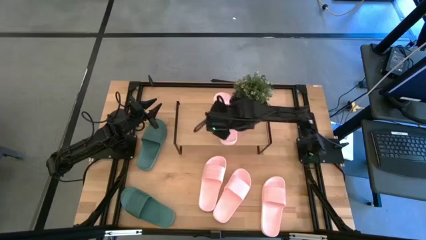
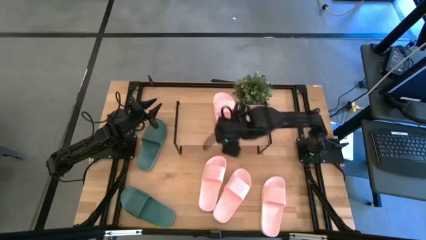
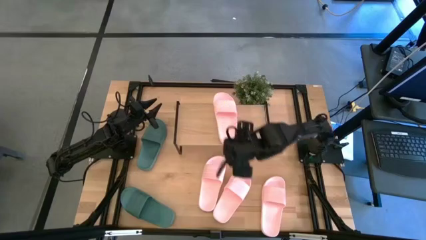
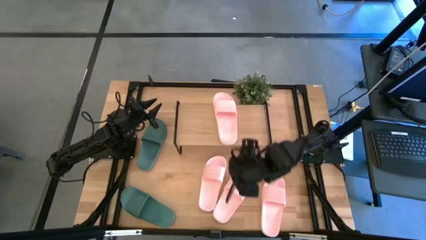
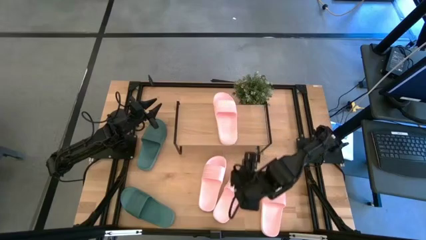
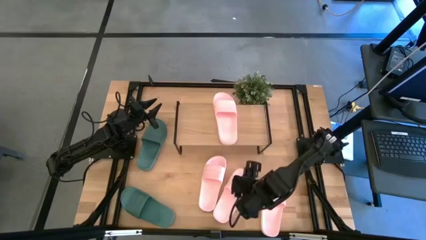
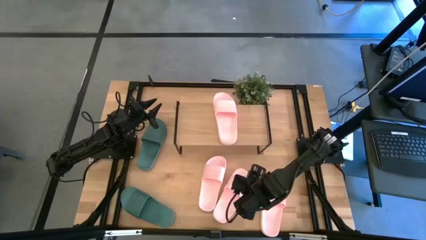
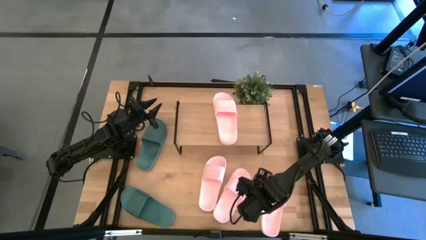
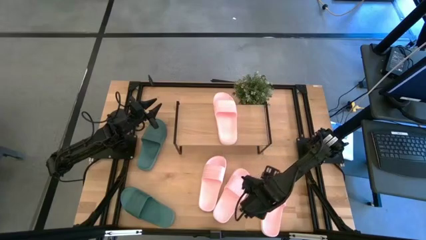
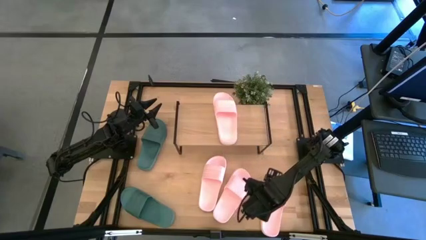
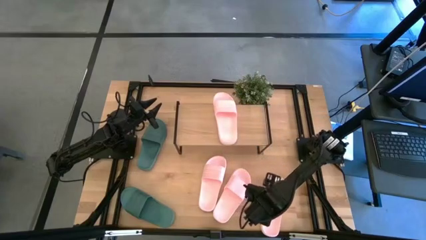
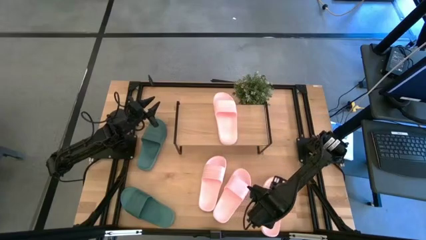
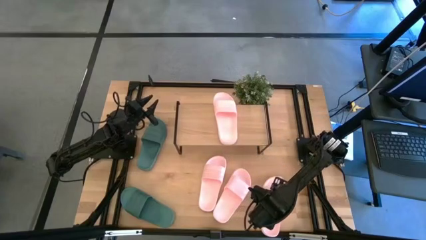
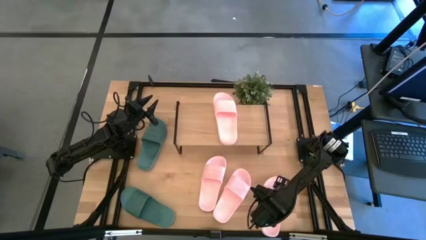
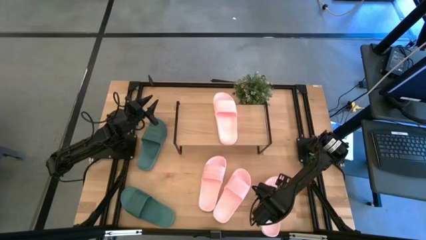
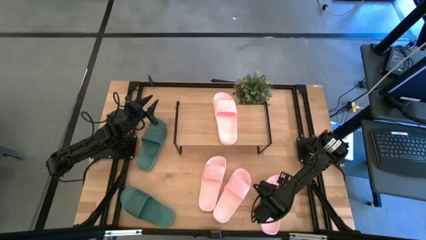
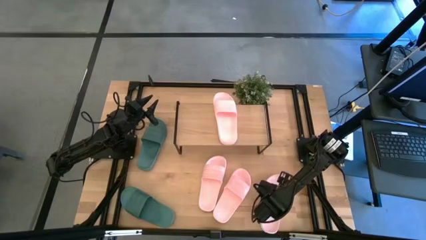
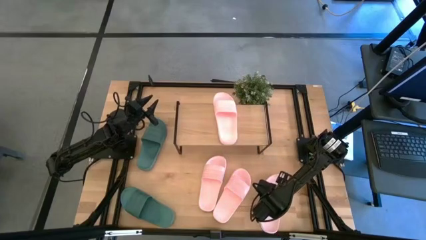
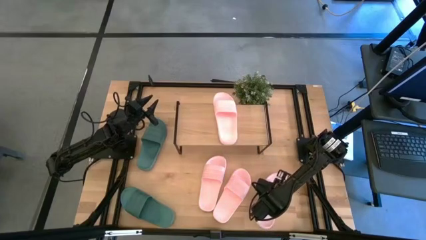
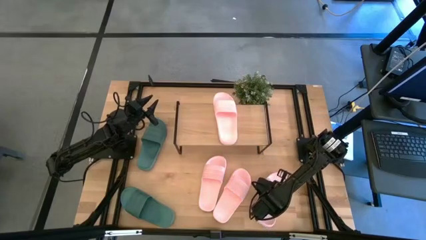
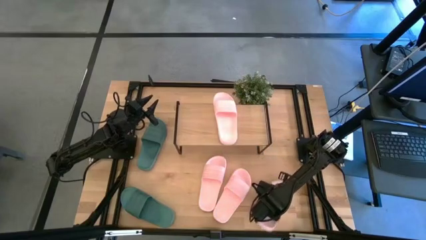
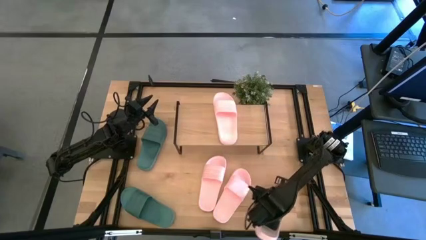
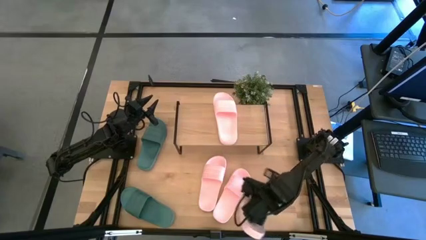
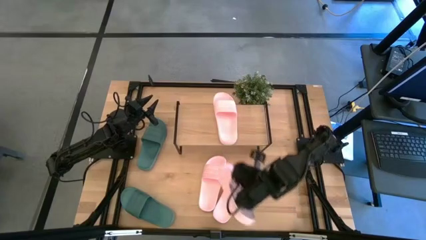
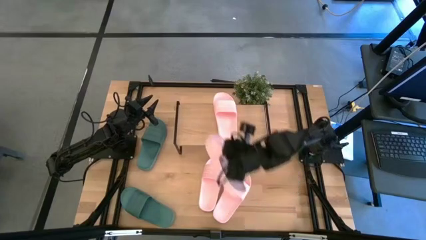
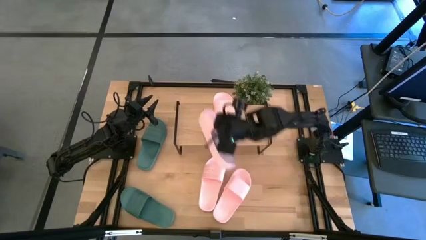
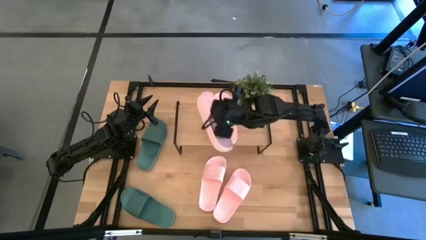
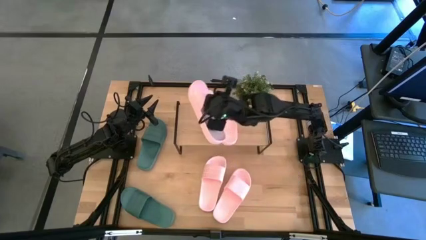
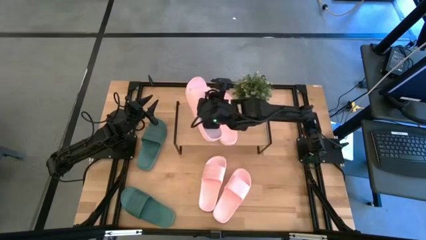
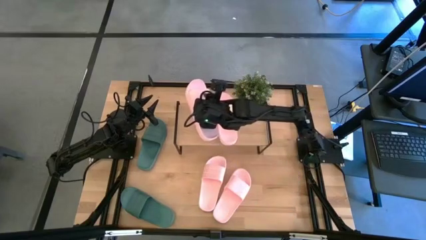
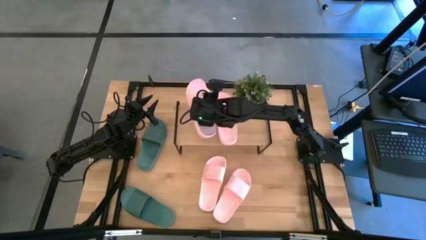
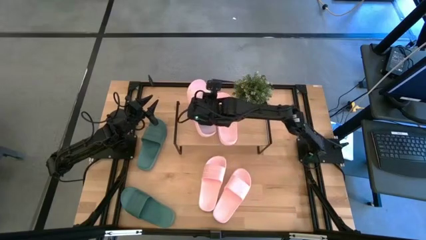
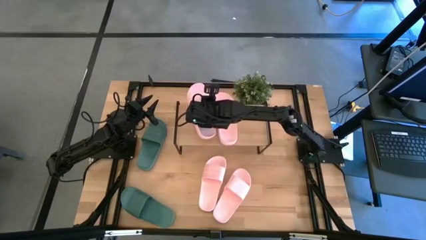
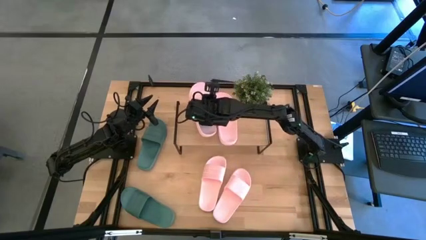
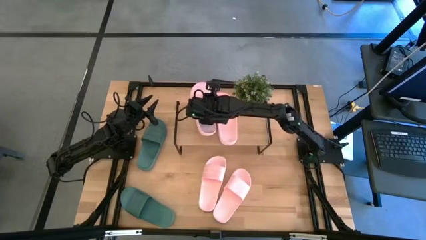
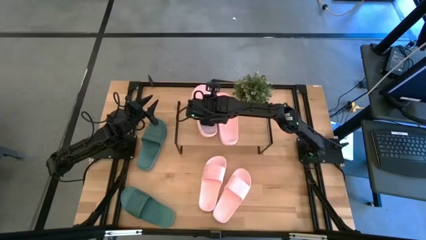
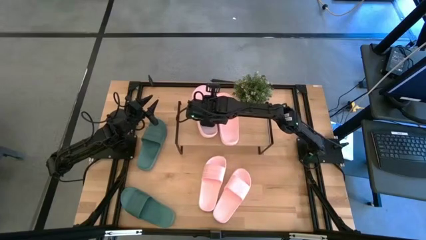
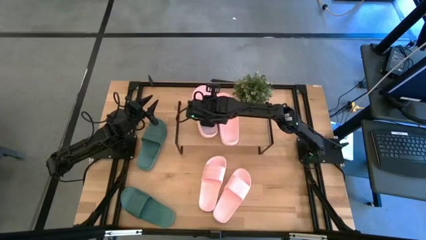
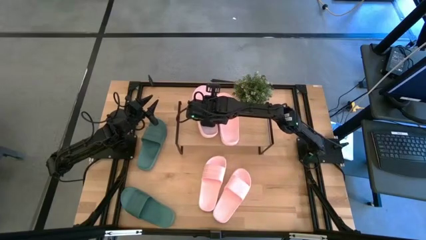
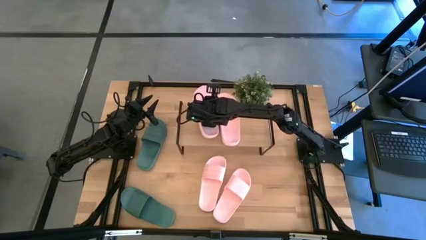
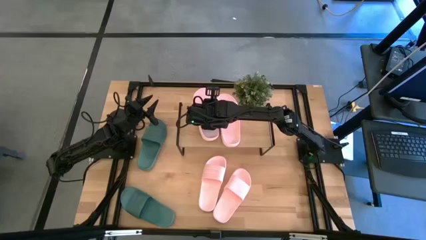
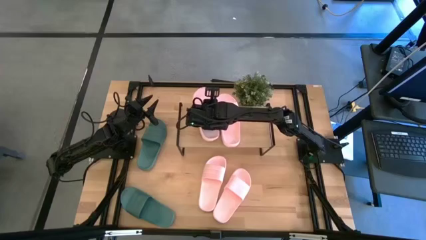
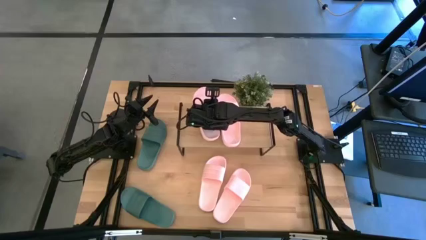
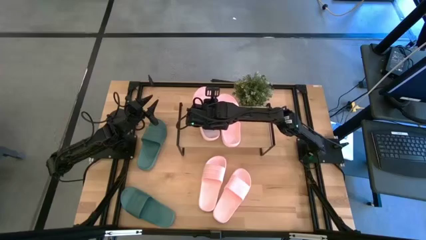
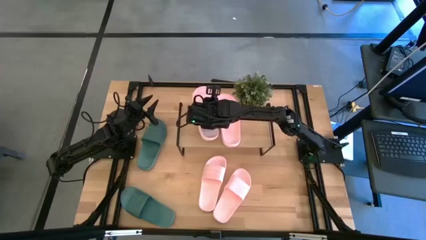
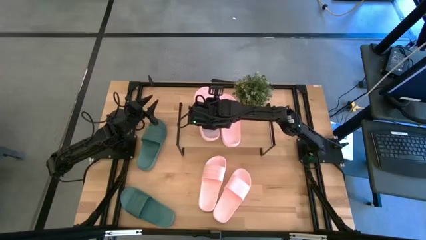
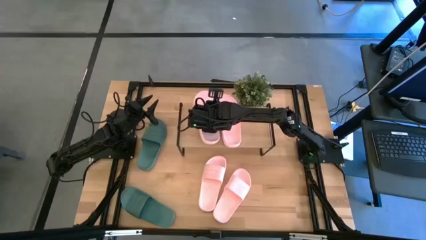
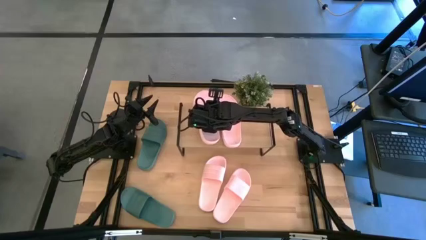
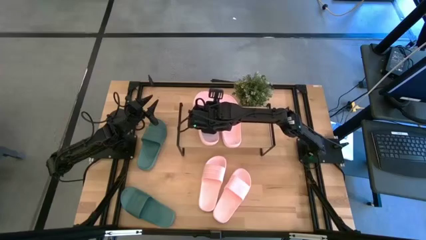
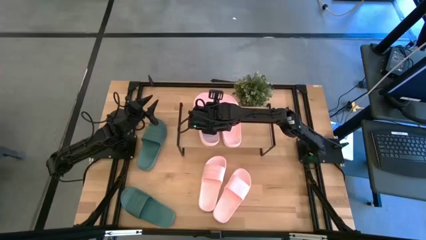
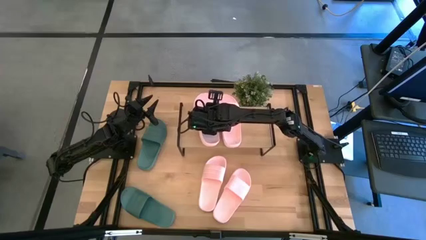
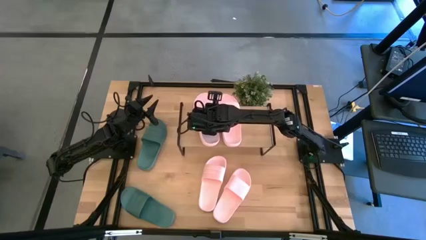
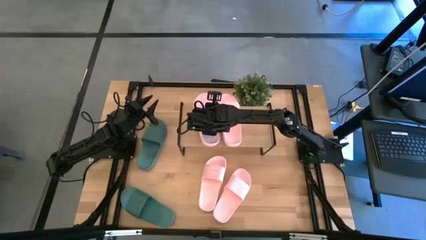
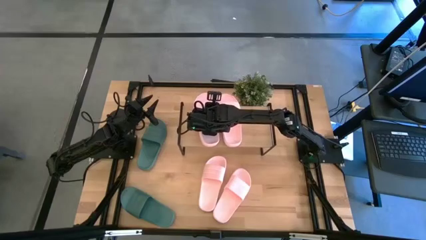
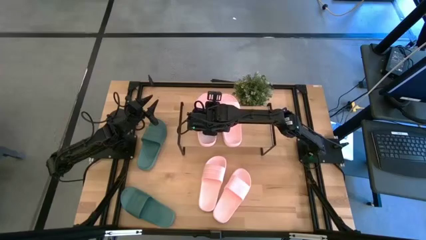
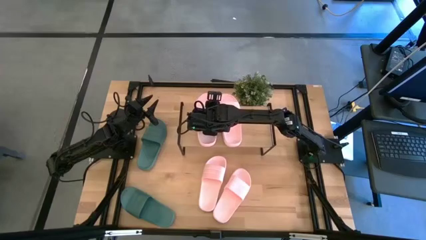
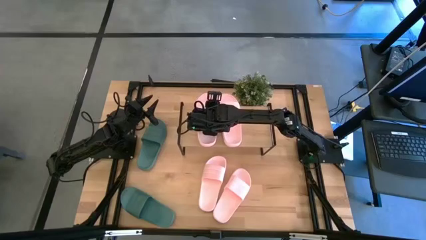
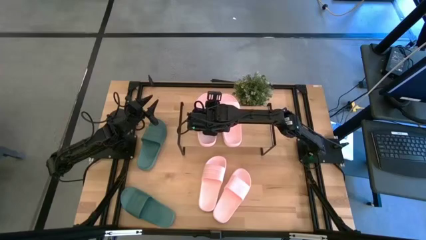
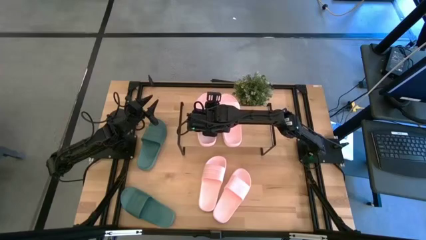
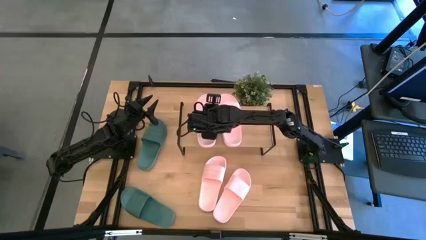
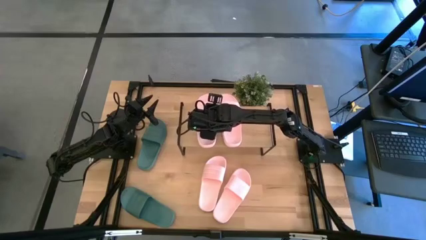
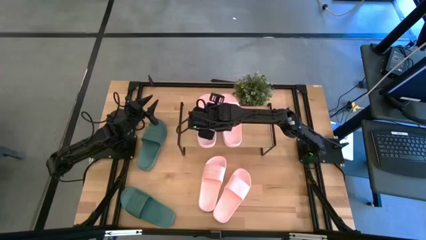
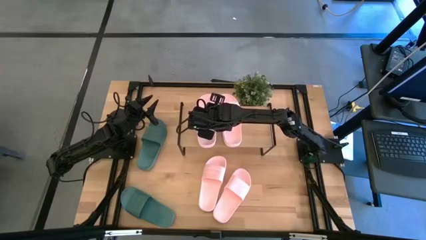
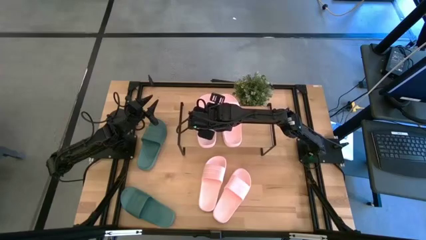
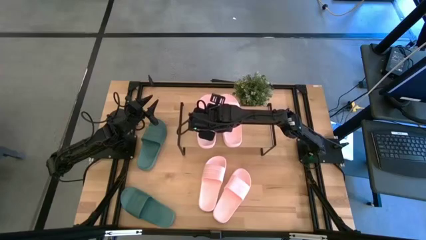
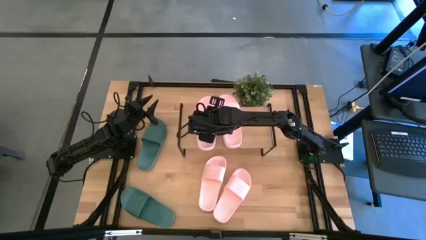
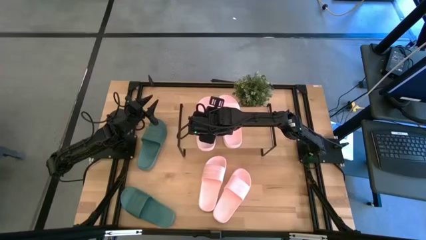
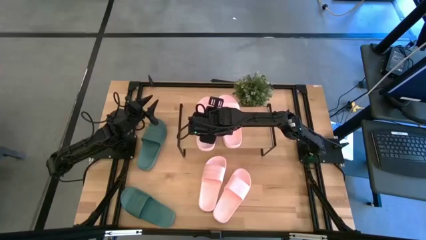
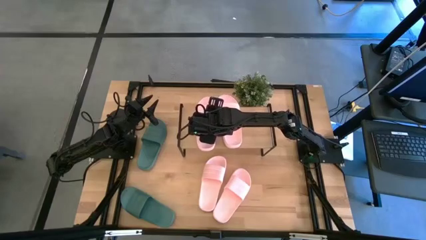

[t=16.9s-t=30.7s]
Task: Pick and place slides into the shelf
Put the pink slide on the shelf
